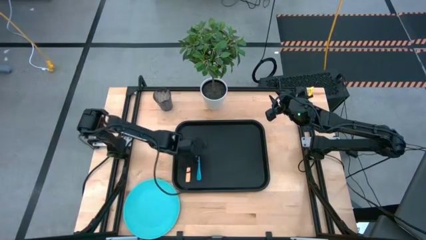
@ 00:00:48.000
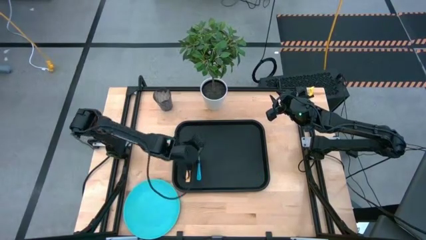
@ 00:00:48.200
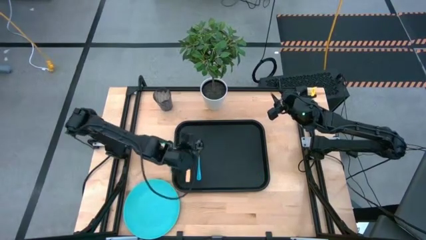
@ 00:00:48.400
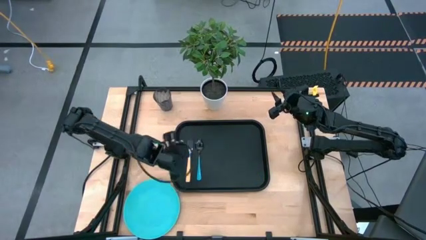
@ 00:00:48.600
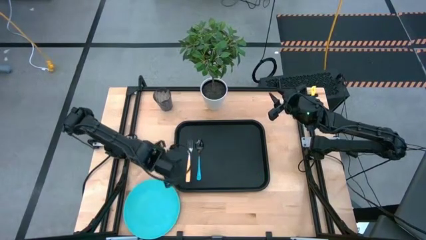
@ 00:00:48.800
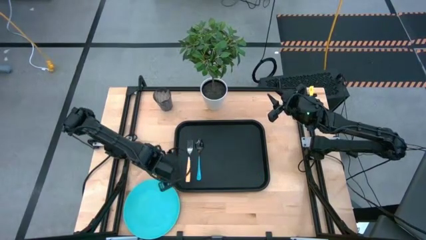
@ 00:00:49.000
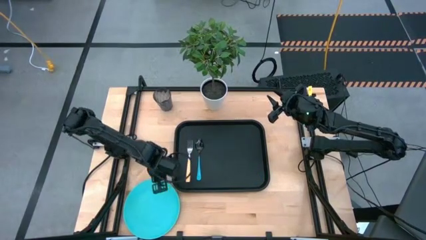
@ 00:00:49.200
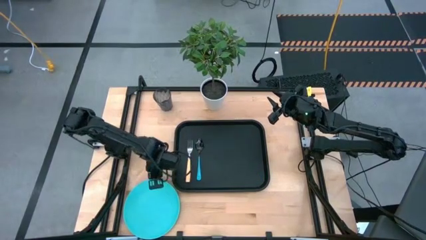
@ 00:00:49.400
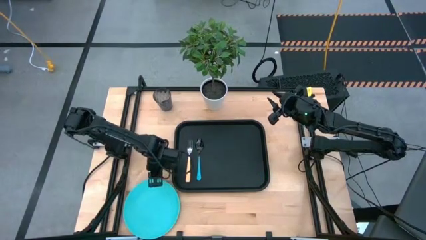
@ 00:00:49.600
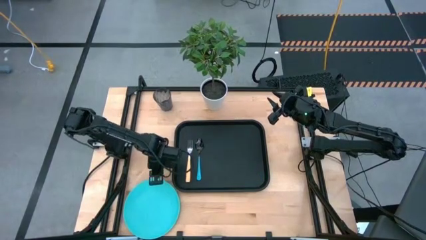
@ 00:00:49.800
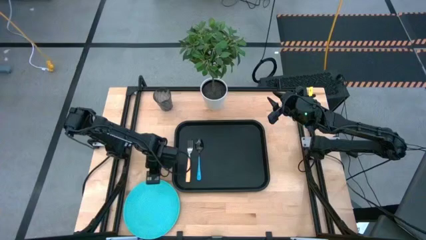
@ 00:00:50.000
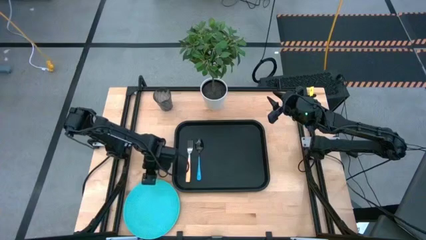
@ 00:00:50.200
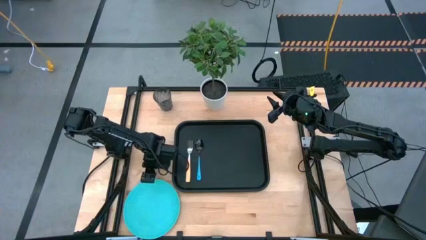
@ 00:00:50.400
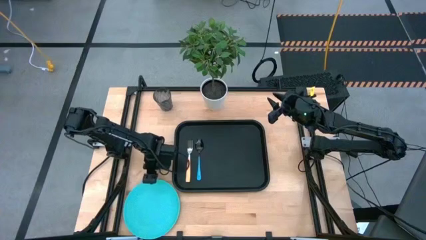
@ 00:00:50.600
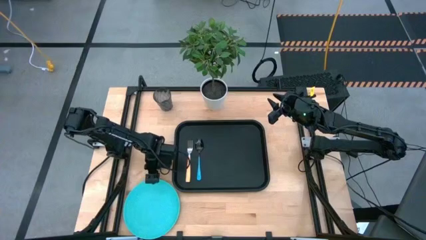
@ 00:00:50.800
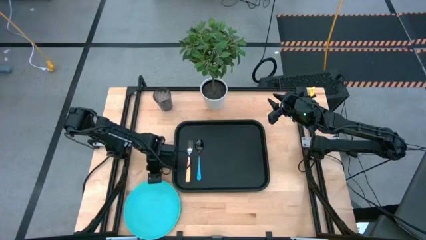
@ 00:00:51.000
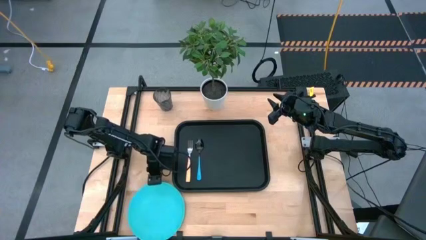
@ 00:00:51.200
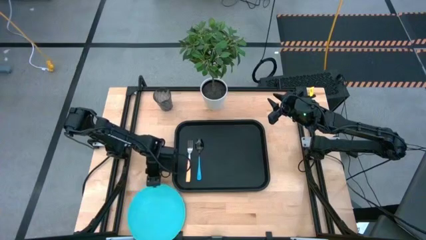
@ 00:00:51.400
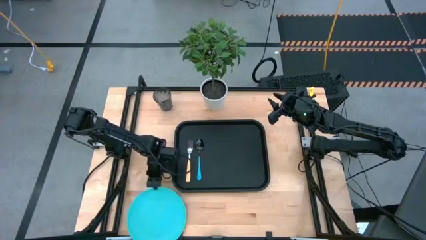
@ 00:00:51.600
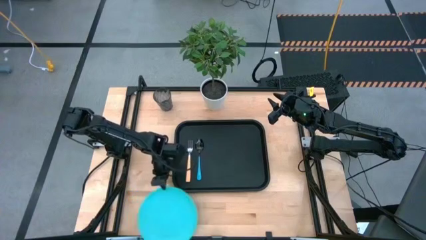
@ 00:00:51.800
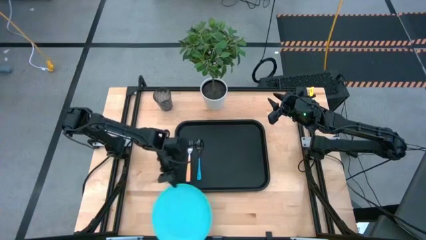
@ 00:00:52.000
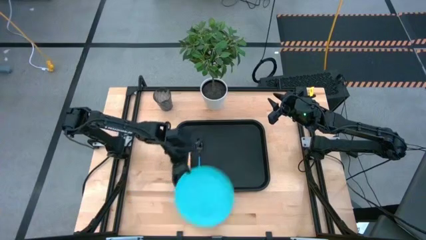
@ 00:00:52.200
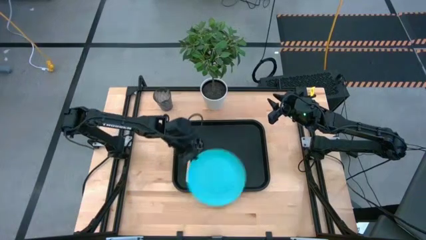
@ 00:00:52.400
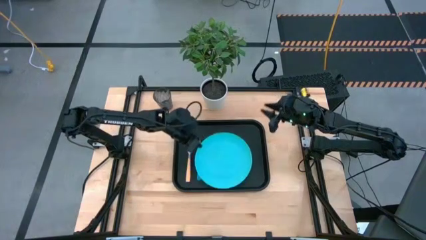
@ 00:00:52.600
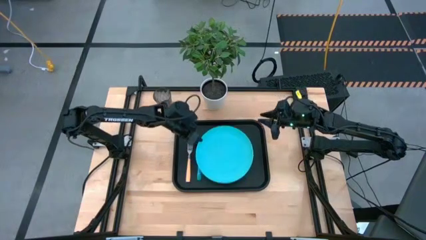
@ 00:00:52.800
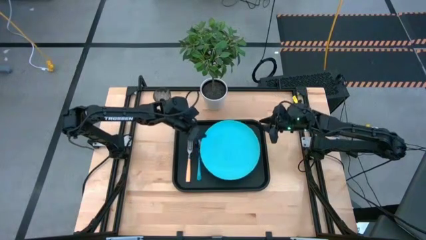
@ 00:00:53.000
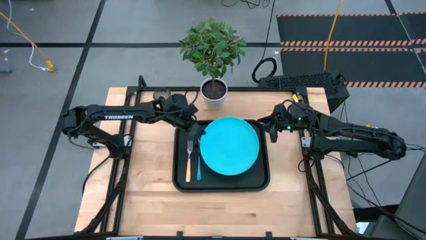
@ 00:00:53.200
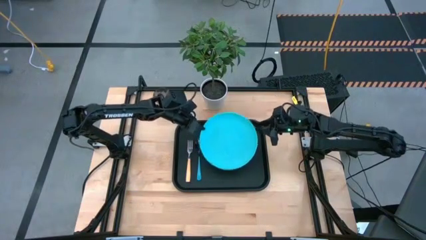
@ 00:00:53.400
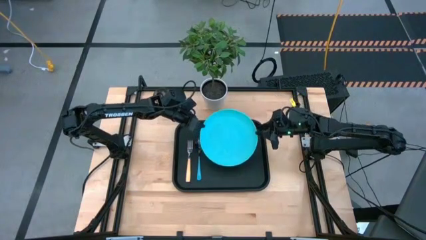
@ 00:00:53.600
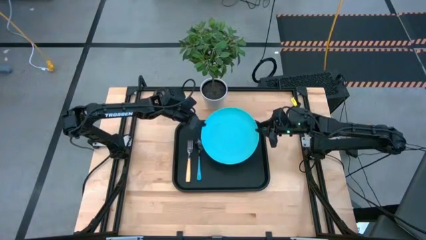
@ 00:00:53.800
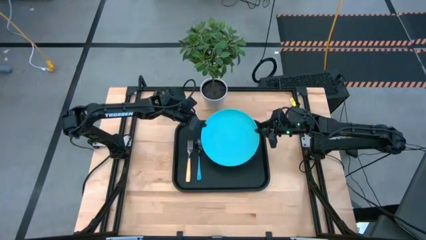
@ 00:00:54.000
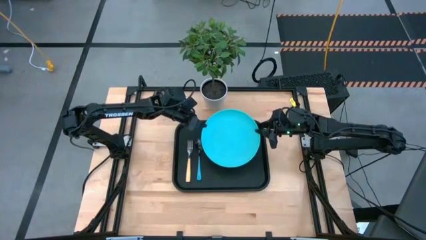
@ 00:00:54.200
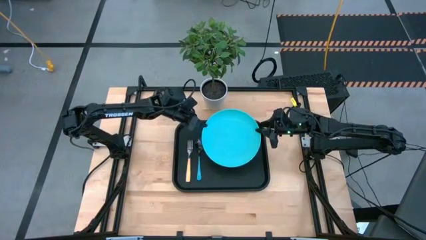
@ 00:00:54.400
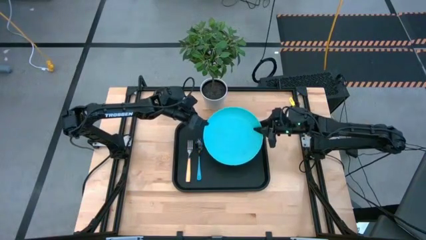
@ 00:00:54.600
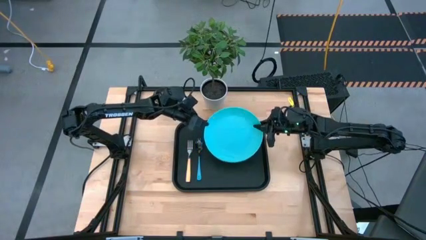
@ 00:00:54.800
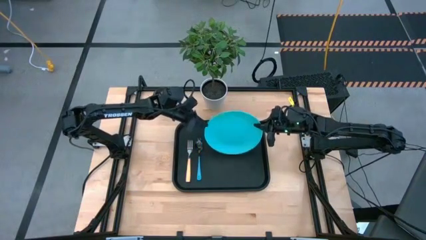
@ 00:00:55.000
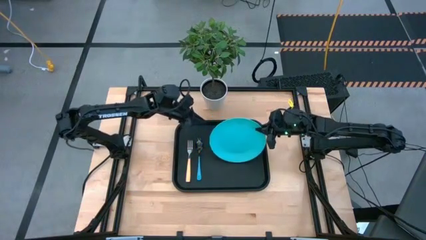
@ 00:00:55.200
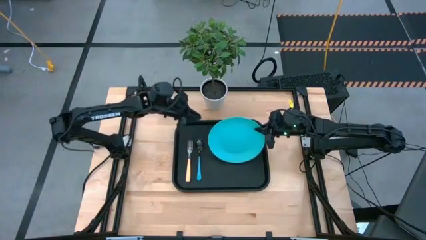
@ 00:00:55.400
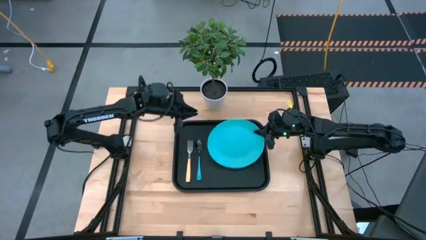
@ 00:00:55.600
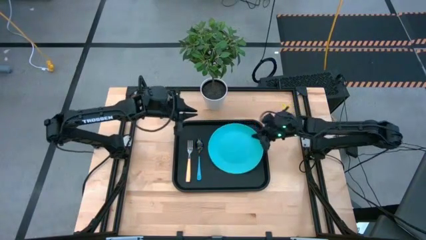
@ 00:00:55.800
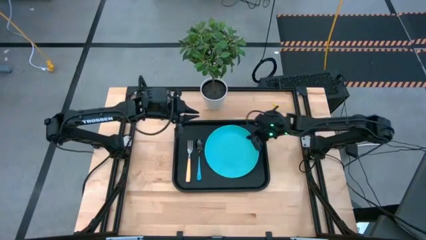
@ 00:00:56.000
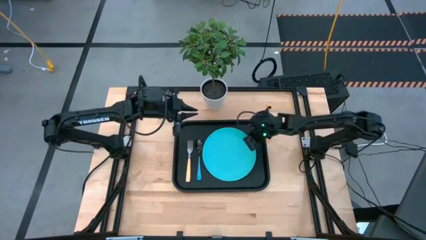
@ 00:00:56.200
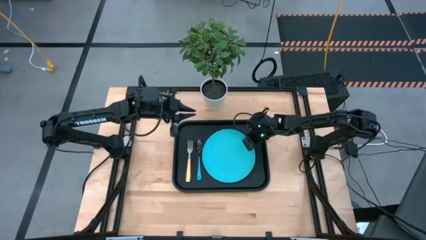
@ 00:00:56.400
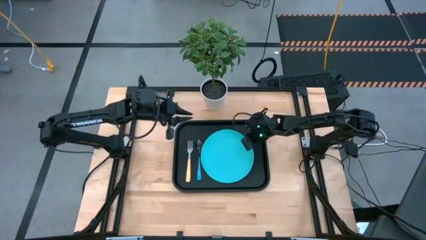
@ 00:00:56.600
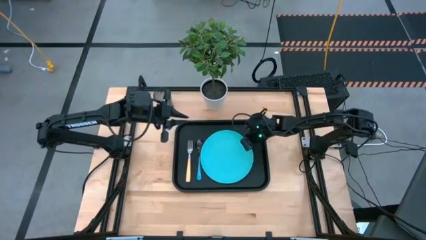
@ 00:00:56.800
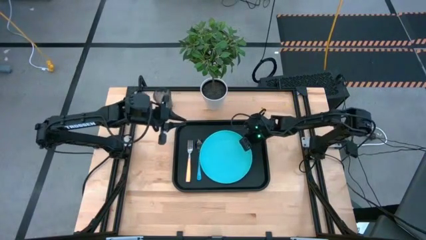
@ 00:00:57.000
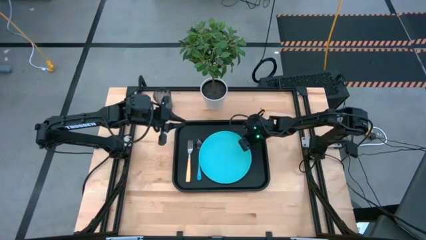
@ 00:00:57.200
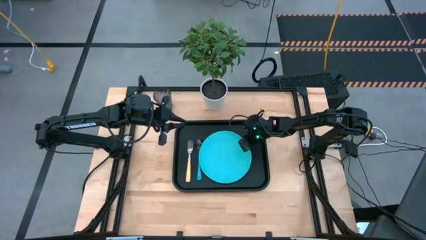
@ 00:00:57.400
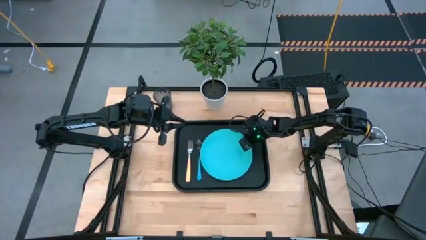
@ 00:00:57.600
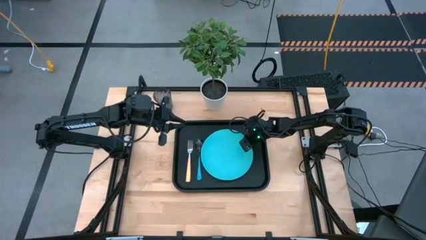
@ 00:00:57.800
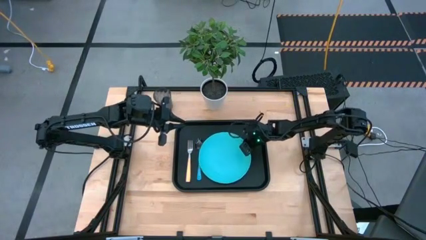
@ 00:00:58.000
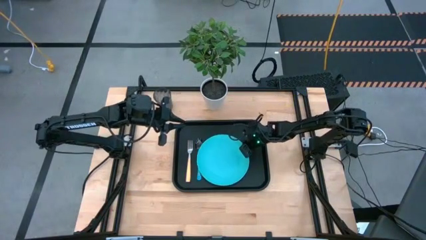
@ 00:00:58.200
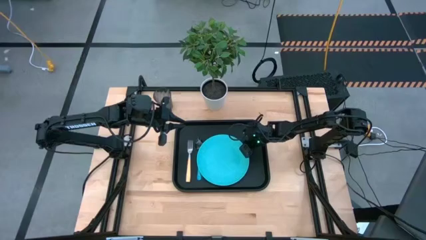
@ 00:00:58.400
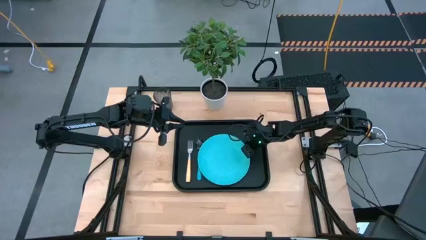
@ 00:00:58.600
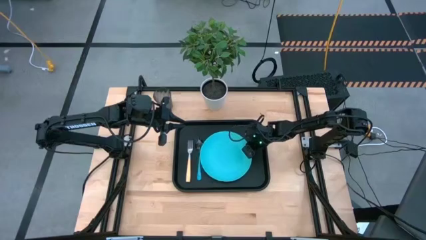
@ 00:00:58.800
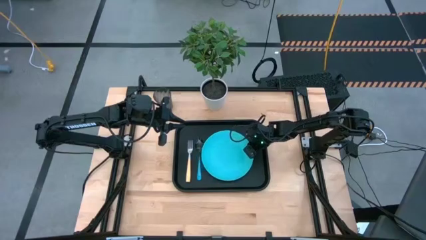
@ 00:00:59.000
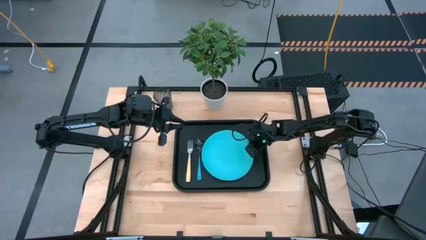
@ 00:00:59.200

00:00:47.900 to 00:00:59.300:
Task: Pick and place plate/cup/fork/spoon on tray
Put the blue plate on the black tray

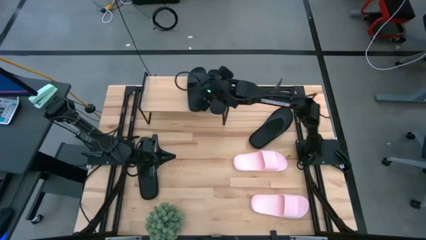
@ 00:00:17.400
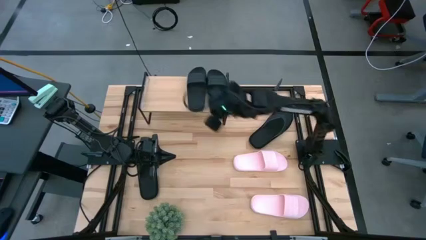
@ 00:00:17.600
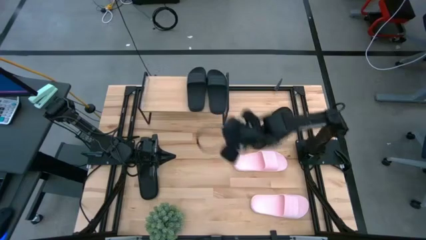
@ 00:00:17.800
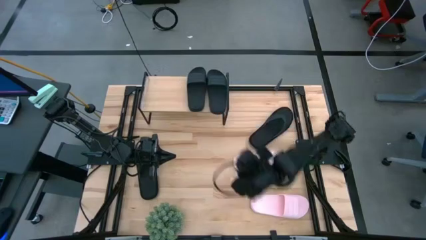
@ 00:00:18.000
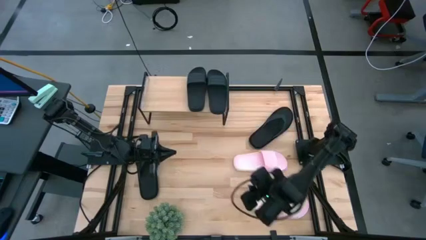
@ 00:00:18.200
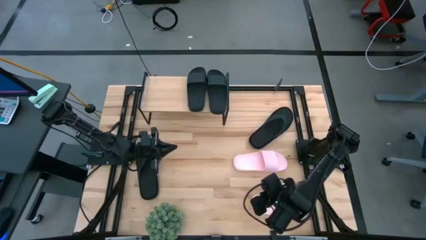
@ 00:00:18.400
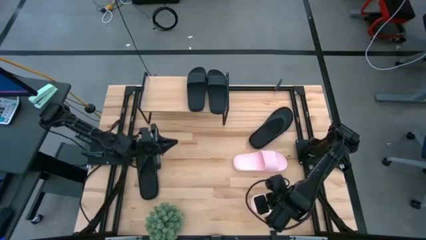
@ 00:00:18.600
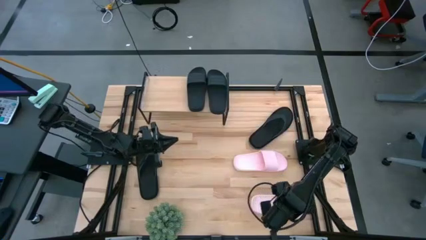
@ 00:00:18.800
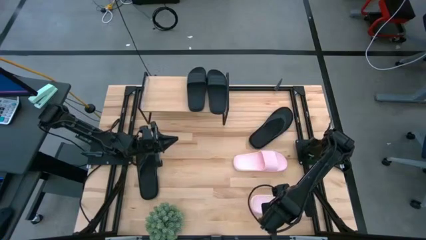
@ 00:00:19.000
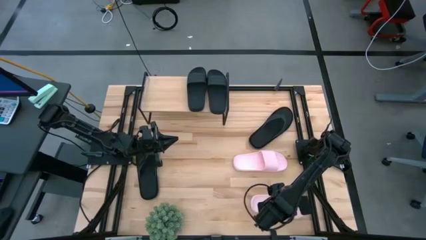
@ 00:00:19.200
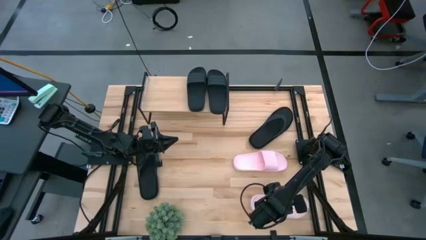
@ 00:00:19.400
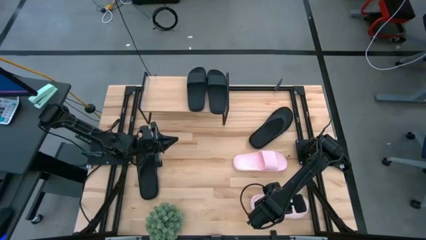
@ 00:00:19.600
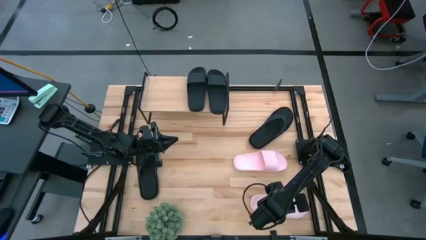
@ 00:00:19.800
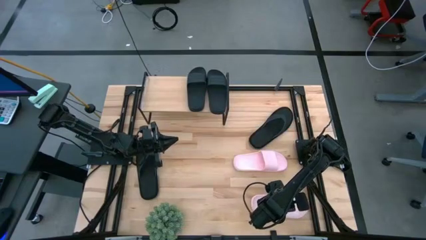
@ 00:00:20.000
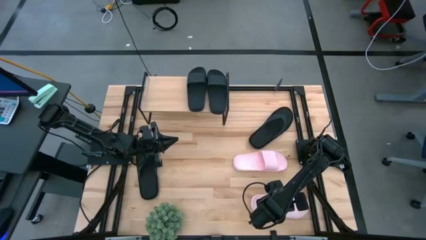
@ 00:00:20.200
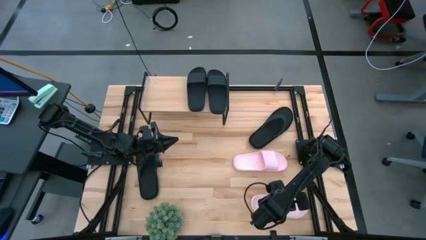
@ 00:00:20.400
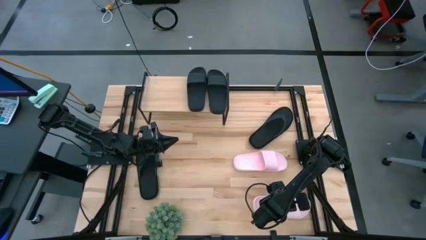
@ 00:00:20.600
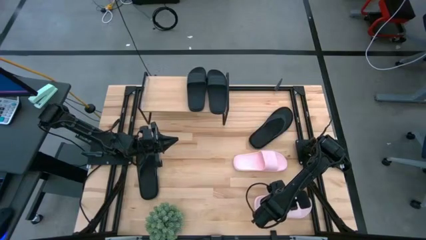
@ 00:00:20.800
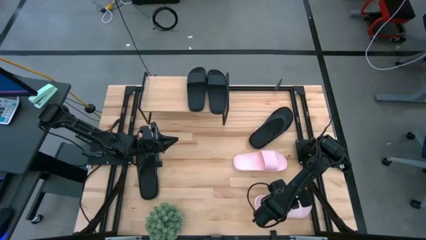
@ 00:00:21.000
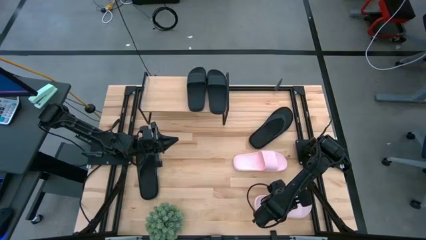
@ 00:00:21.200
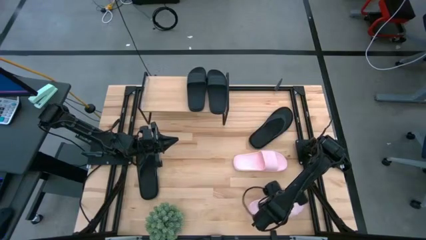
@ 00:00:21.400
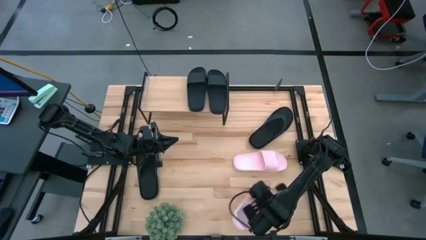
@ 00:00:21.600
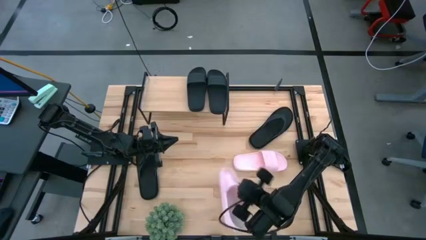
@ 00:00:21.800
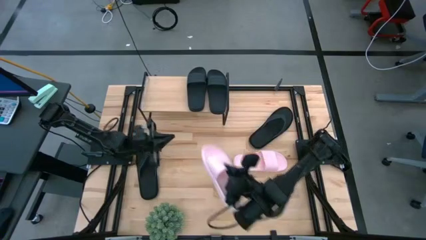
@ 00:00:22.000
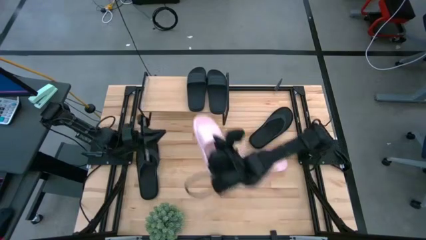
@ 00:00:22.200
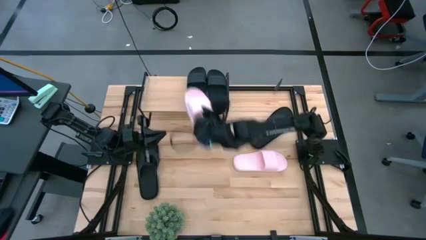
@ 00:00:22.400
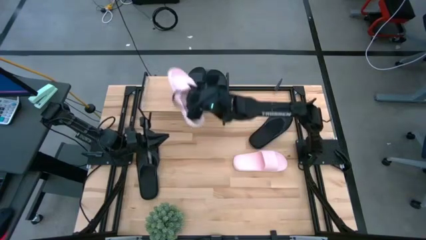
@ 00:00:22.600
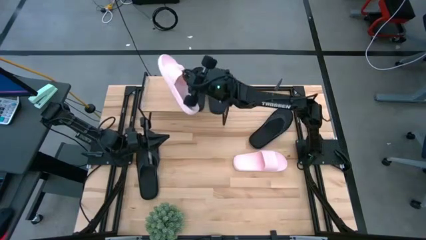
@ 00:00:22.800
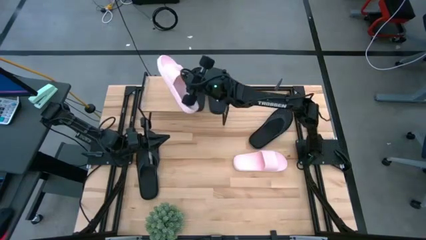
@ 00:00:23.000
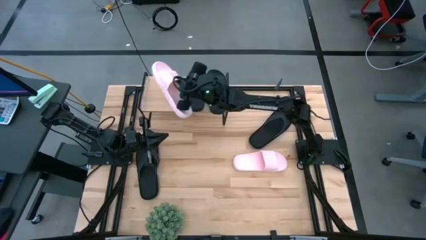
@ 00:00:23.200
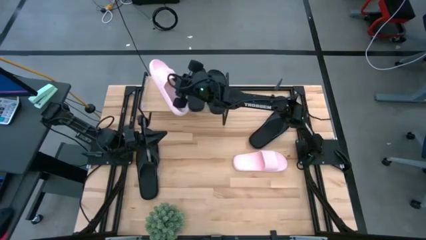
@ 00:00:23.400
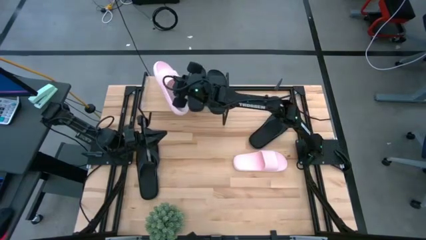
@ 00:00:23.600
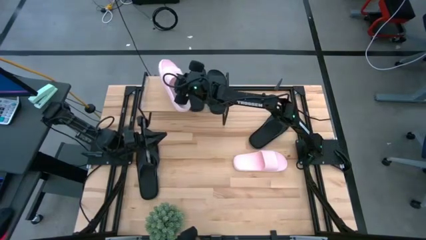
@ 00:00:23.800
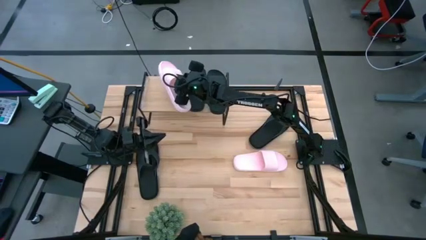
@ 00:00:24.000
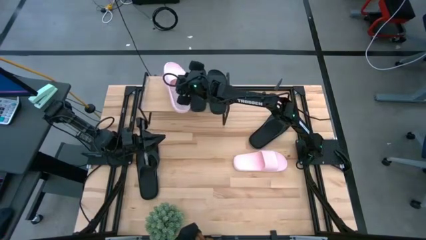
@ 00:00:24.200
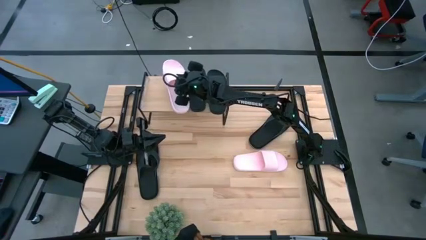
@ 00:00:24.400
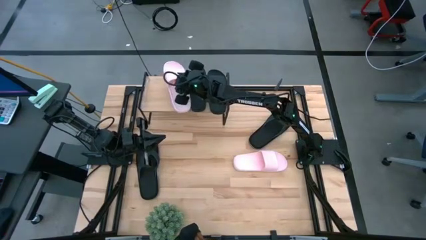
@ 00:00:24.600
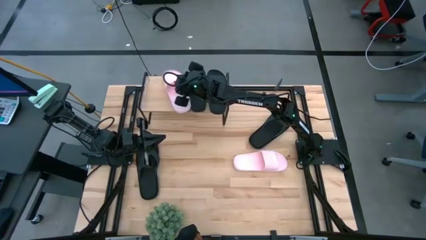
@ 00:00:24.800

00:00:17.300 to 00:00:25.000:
Task: Pick and place slides into the shelf
Put the bottom pink slide on the shelf
